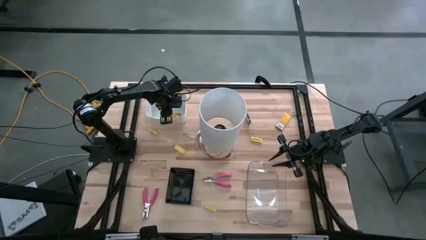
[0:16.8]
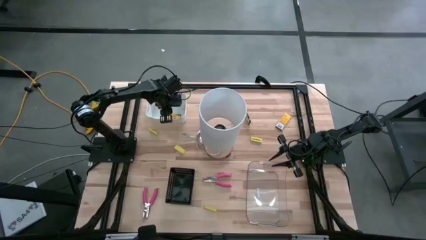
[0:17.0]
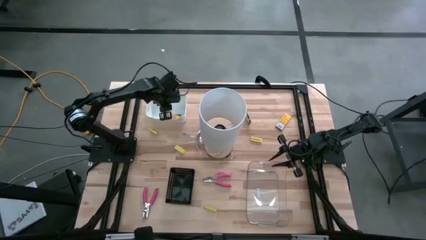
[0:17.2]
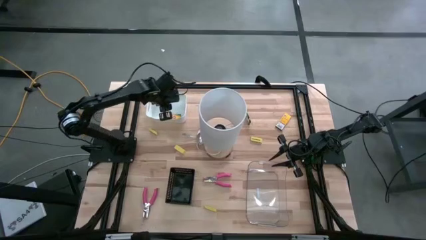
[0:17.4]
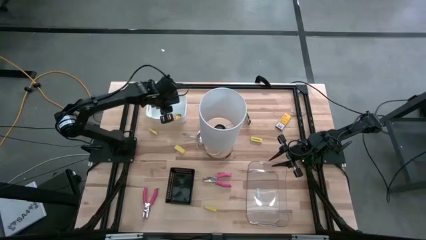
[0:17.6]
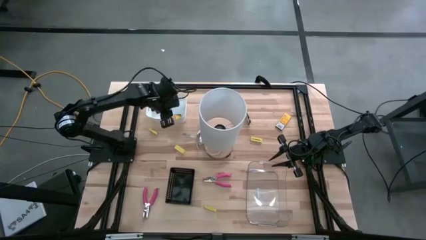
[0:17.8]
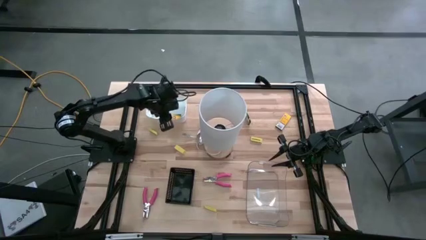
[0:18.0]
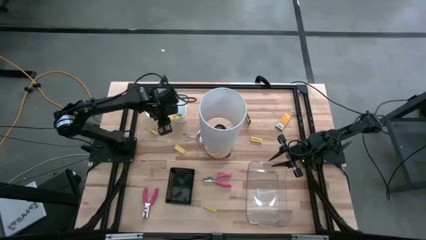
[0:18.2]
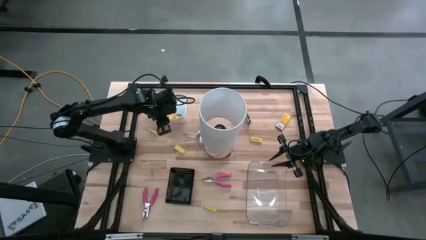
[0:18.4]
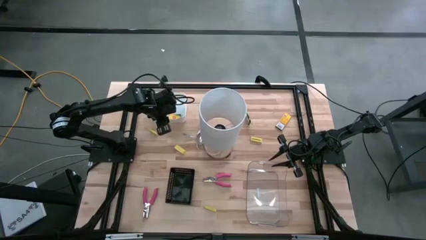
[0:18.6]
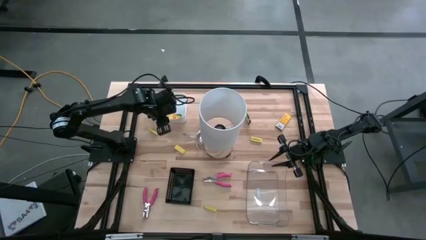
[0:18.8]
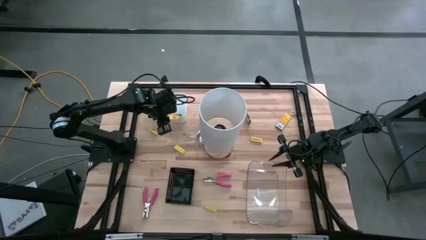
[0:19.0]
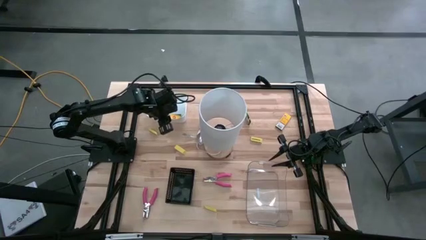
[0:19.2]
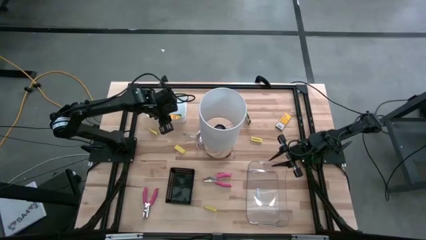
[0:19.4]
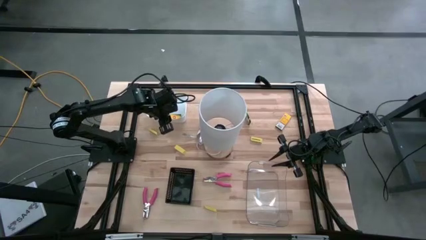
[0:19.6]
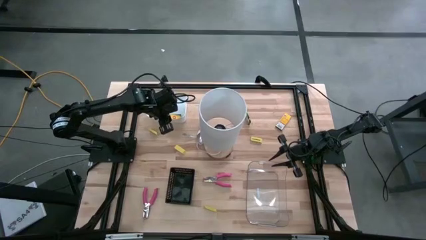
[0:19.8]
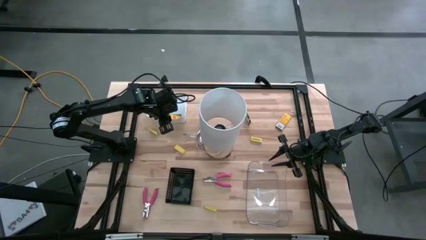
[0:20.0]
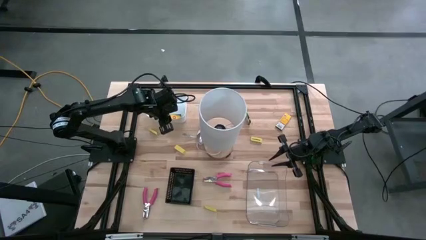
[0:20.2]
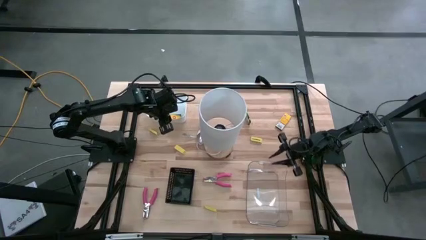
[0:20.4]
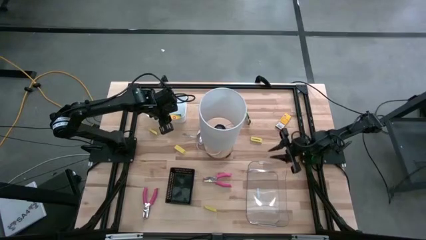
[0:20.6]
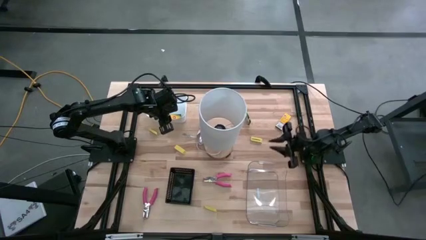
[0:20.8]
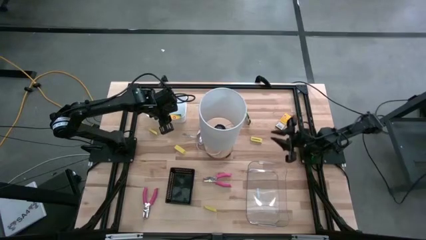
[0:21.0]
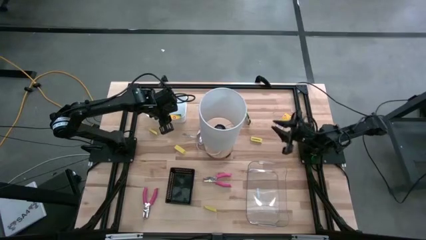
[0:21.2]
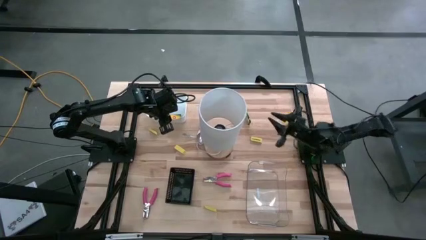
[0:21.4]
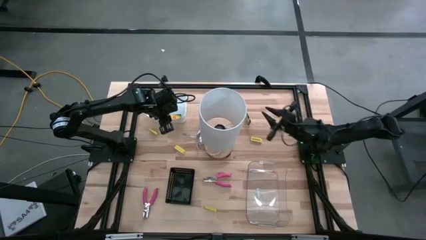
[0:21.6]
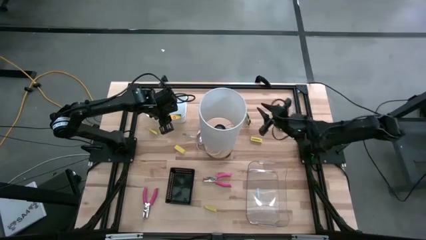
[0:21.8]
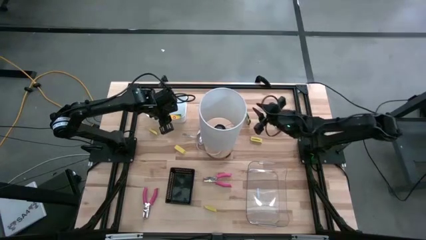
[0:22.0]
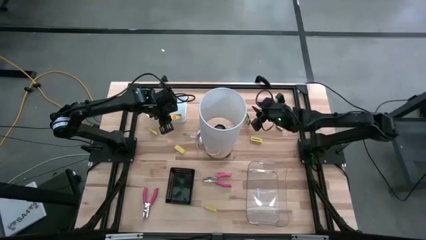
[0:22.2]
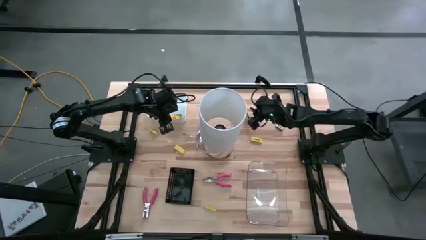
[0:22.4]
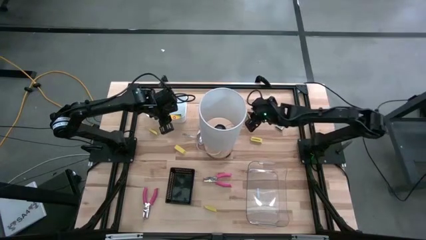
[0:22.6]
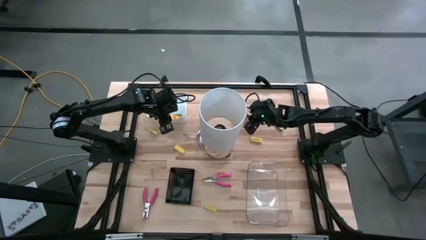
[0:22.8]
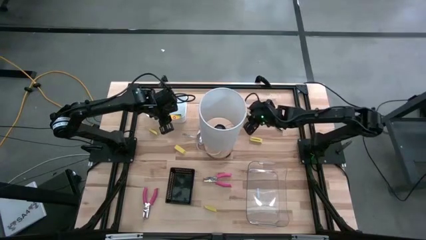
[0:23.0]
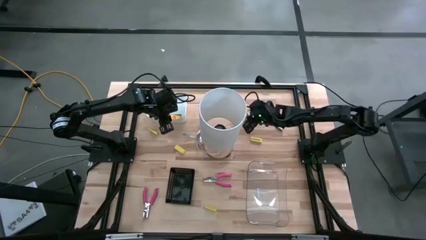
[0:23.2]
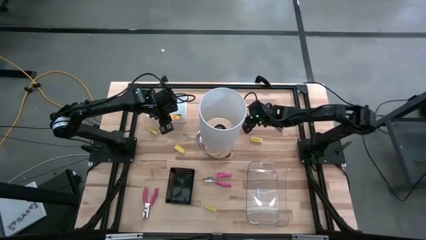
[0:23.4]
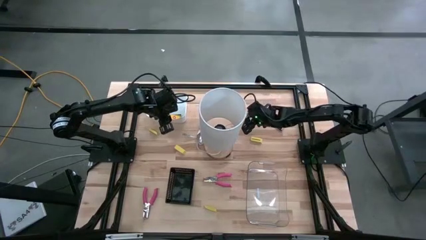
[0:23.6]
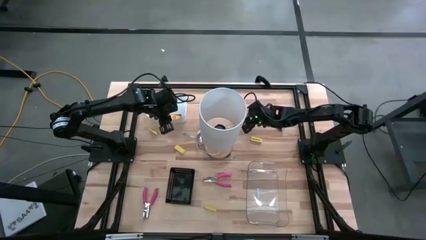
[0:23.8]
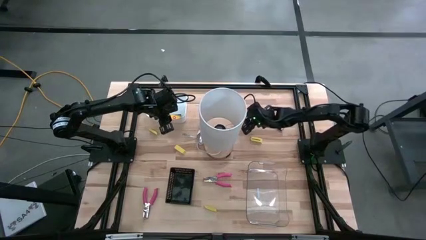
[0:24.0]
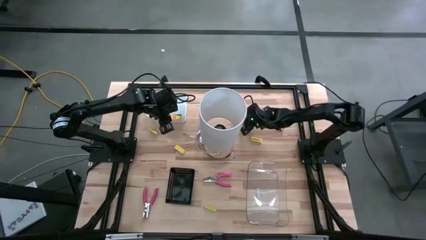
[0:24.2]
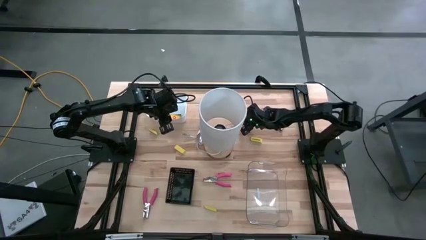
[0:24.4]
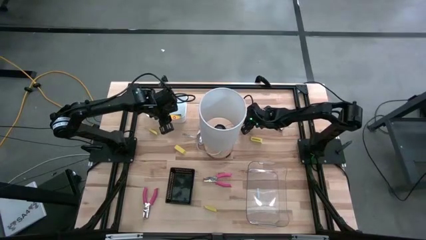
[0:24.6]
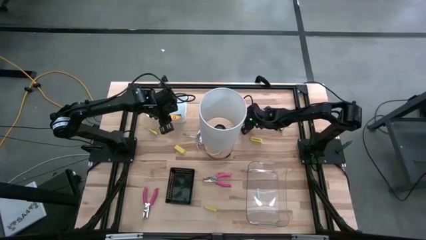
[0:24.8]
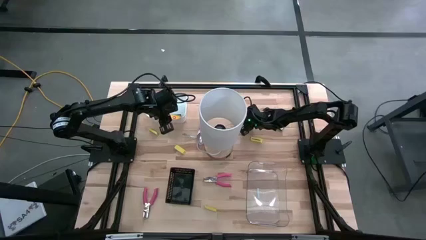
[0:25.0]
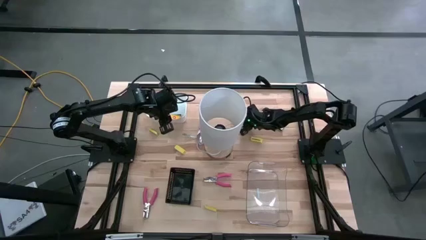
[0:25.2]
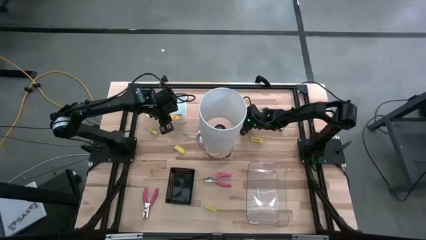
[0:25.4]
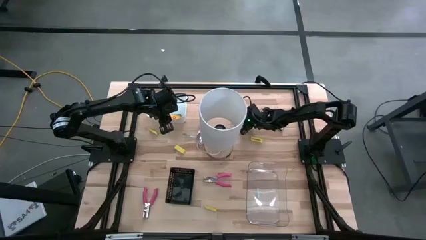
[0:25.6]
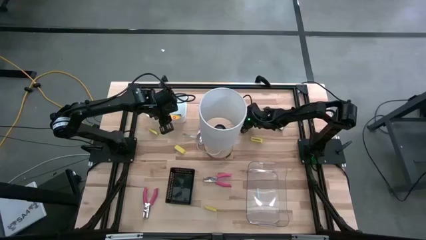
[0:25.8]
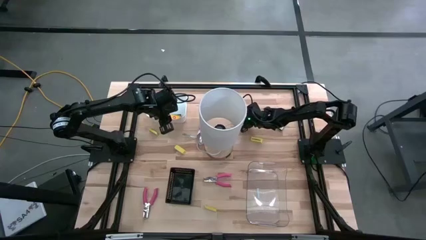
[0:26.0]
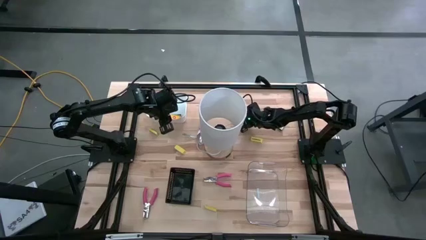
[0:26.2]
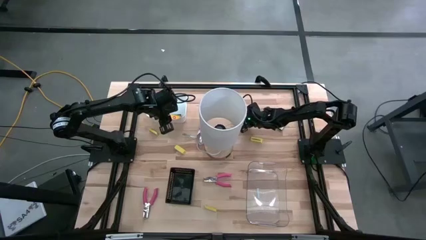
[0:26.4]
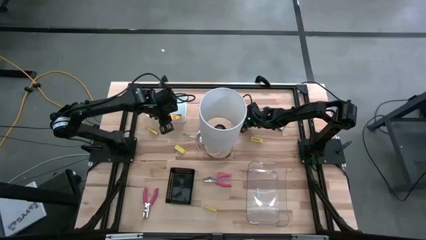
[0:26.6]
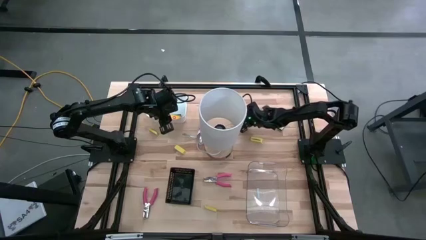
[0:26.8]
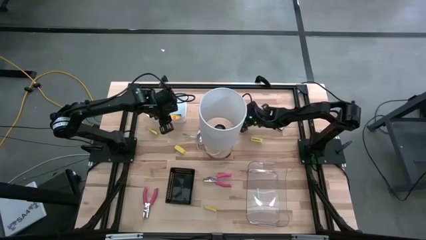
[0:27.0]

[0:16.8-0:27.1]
Task: Pick & Place School Supplies
Put the crayon box into the white bin

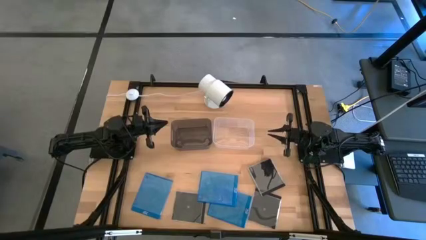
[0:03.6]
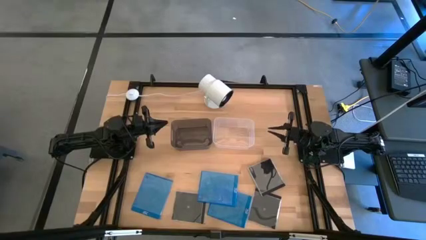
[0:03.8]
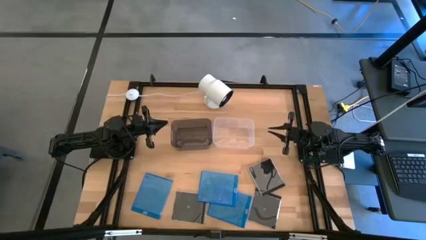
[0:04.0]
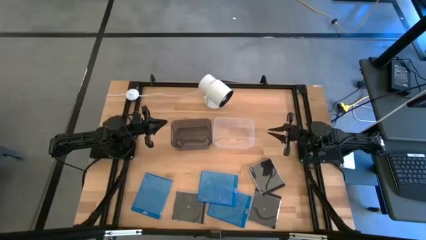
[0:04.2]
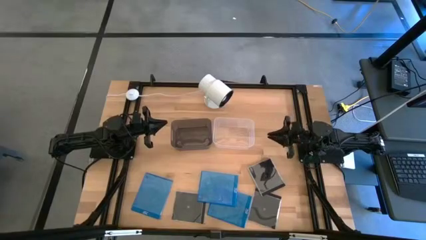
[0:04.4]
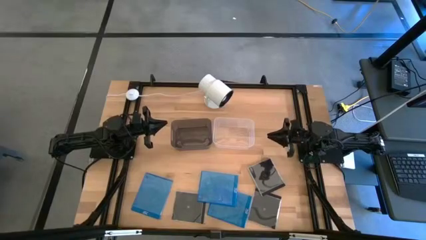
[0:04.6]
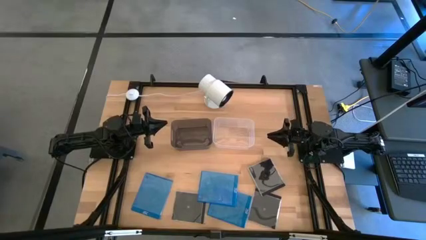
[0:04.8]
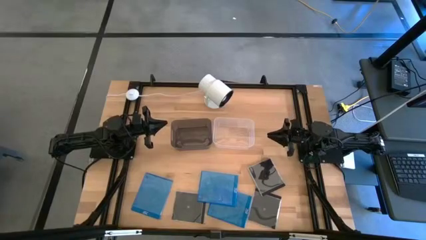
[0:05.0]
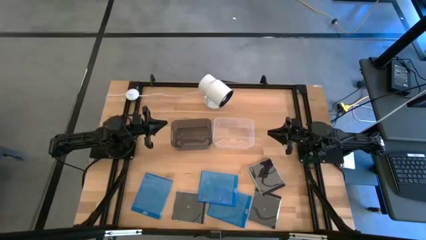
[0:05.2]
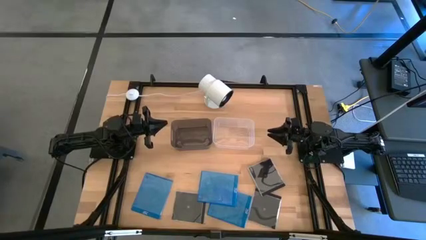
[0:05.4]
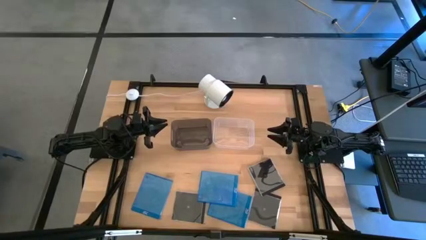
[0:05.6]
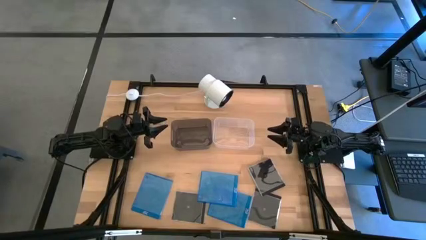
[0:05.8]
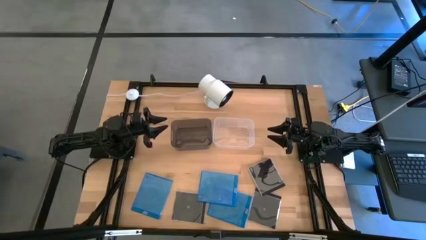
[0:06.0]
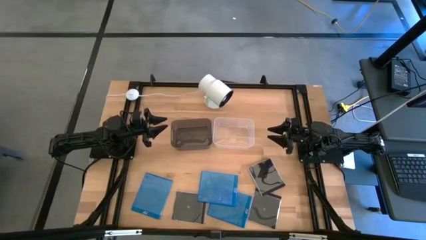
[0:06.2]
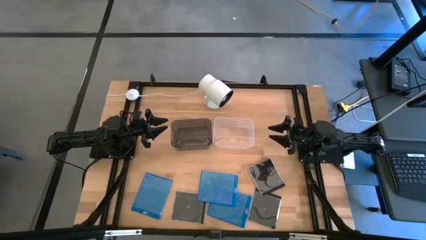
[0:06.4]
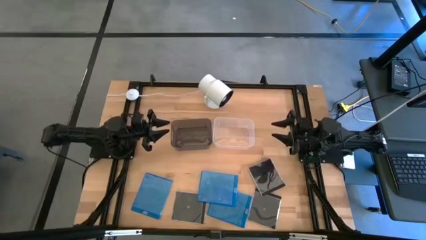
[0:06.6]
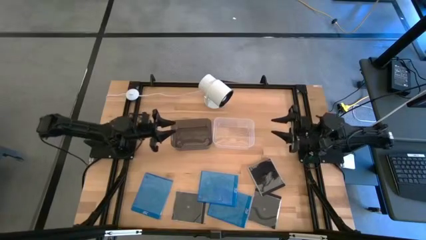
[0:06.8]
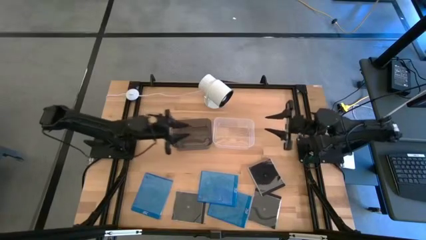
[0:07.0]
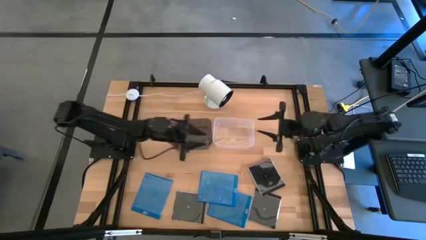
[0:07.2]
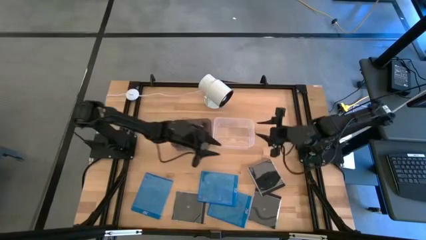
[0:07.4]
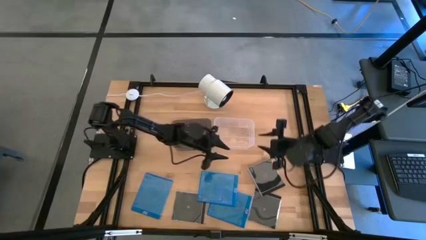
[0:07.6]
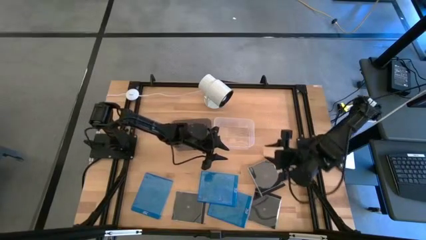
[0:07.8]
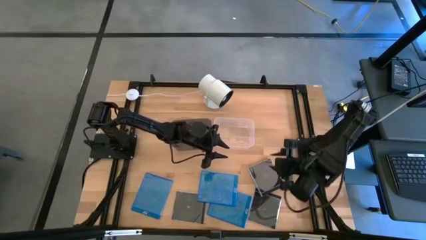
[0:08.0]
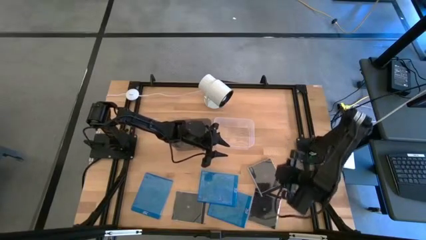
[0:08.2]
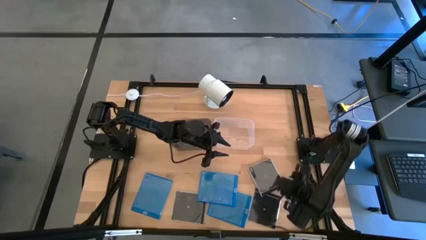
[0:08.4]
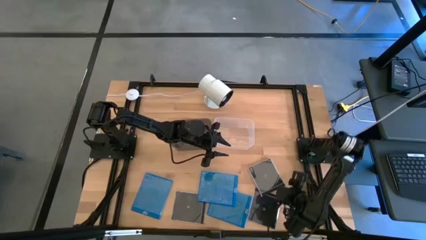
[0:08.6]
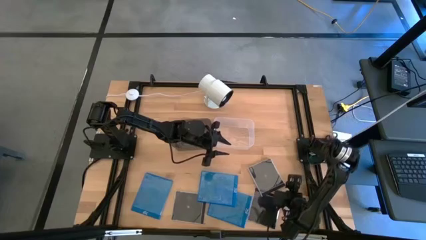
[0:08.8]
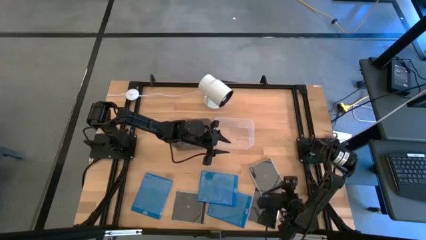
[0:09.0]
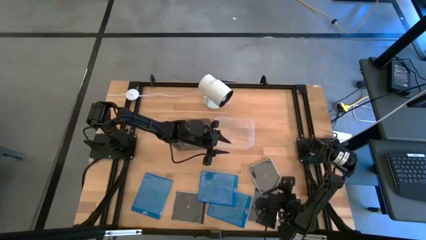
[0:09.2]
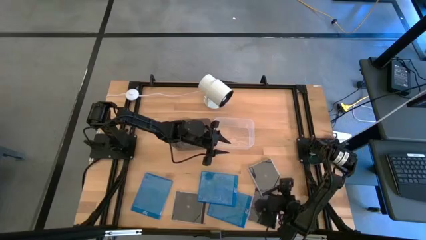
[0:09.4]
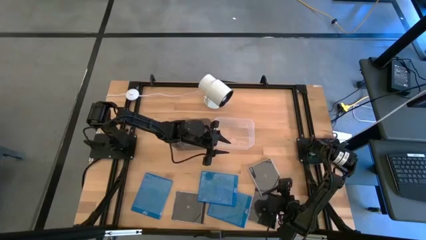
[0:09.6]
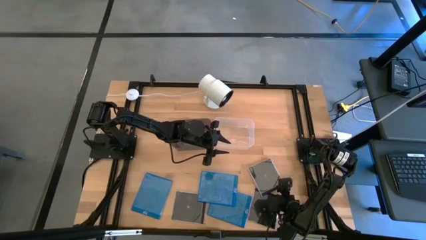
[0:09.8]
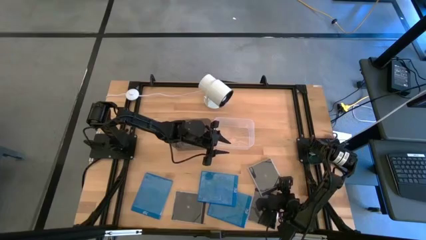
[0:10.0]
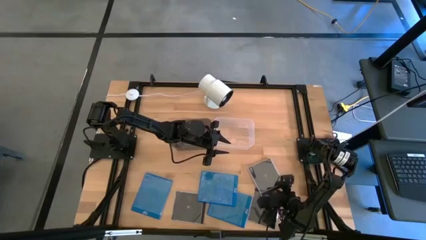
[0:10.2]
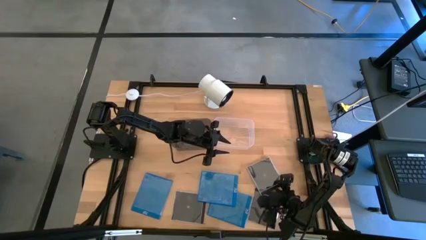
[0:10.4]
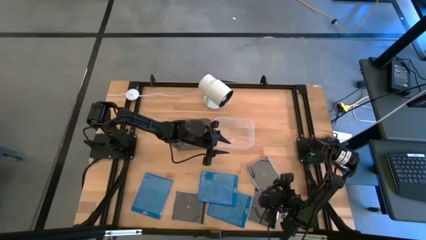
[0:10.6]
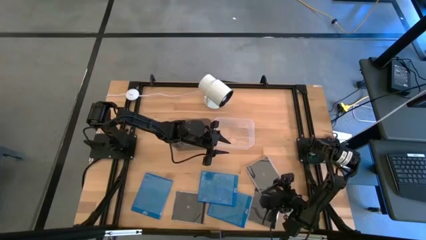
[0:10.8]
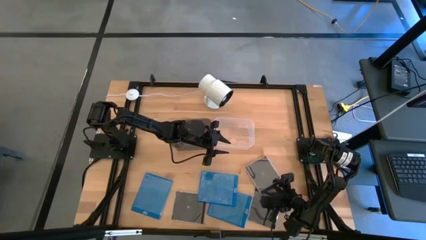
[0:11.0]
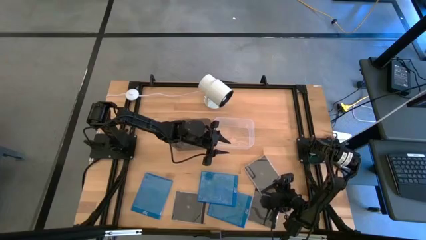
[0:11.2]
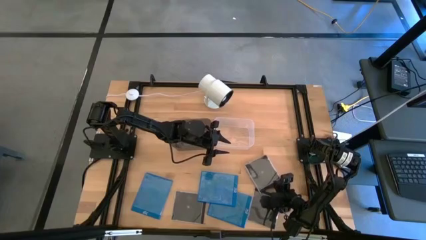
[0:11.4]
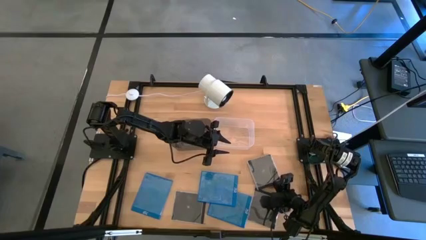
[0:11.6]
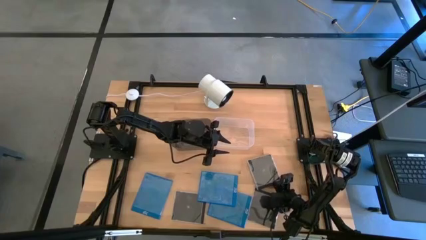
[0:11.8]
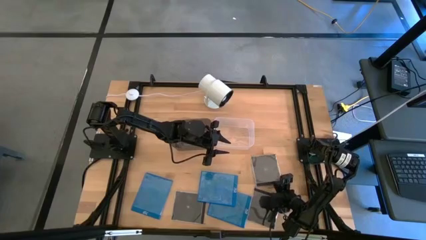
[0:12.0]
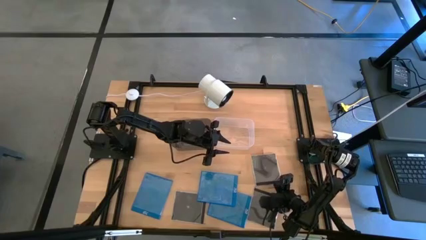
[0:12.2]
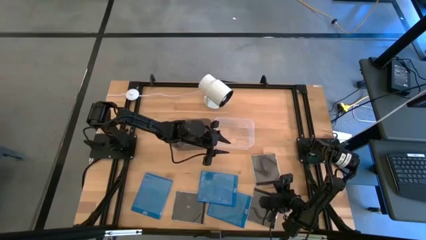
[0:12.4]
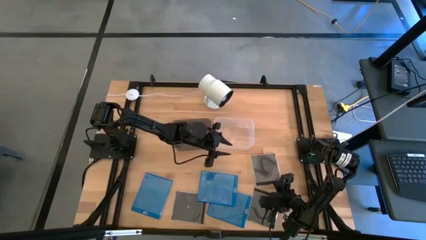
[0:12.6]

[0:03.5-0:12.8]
Task: Pick & place jewel cases by type
Put the top right black cd case into the transparent bin
